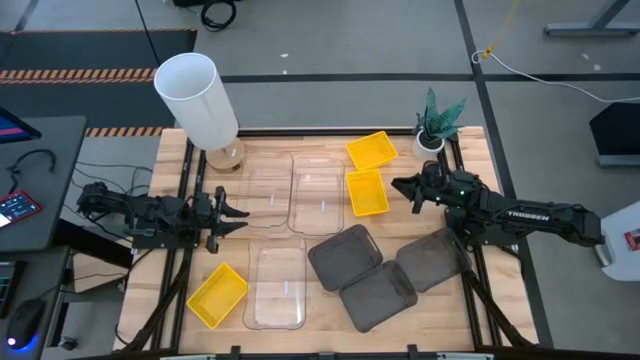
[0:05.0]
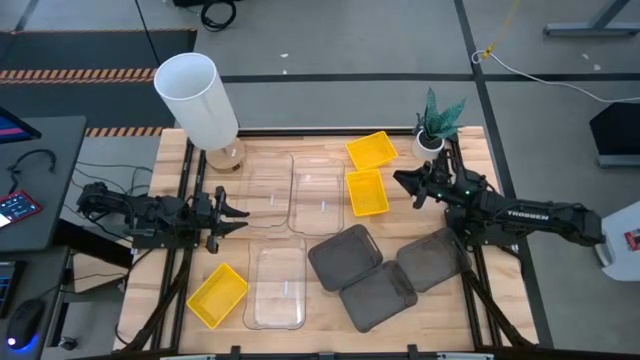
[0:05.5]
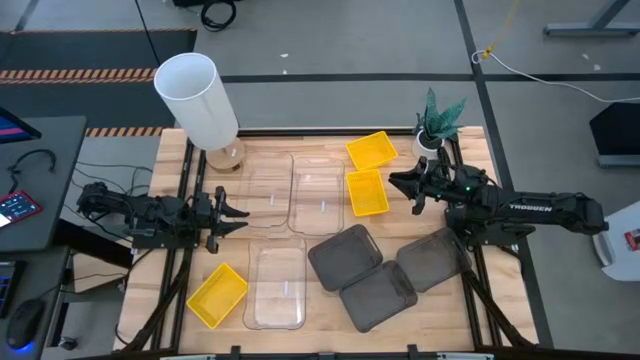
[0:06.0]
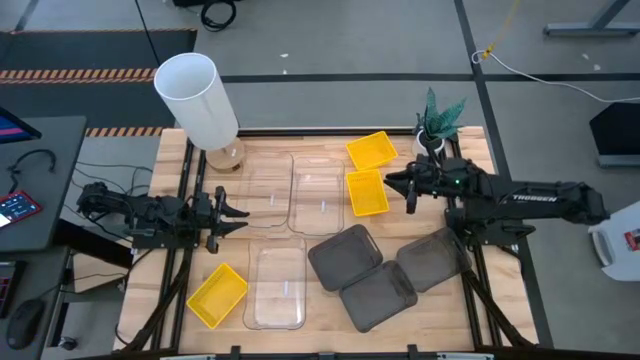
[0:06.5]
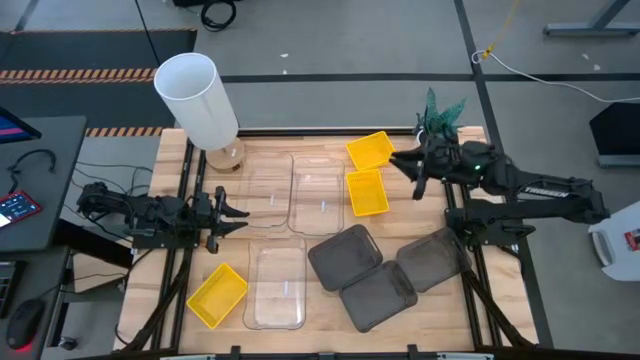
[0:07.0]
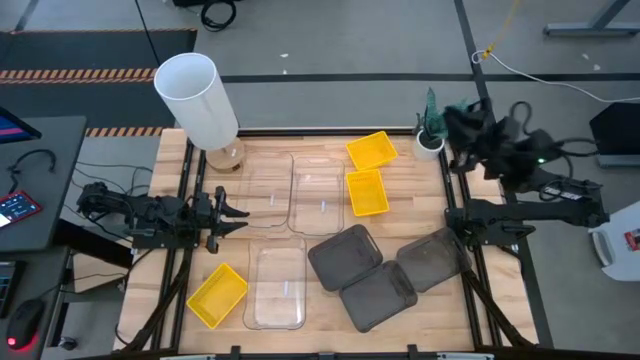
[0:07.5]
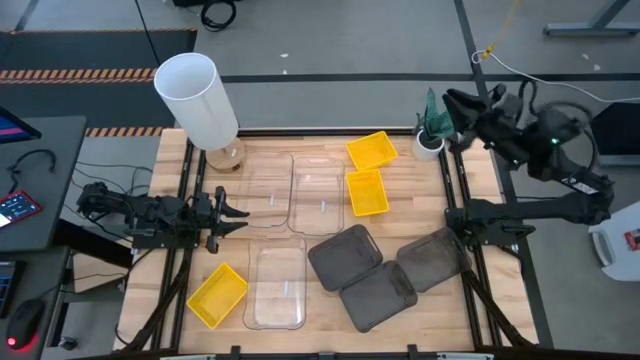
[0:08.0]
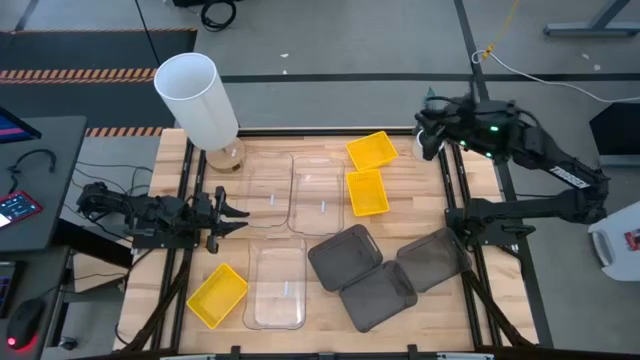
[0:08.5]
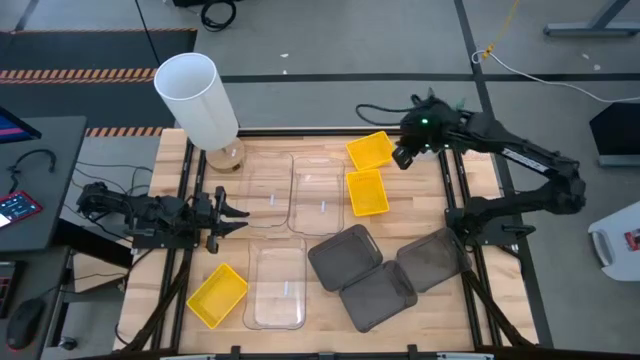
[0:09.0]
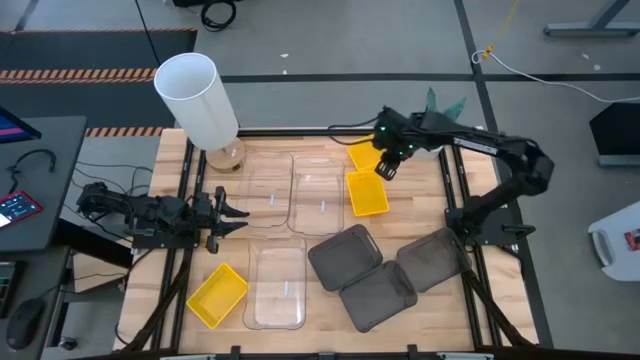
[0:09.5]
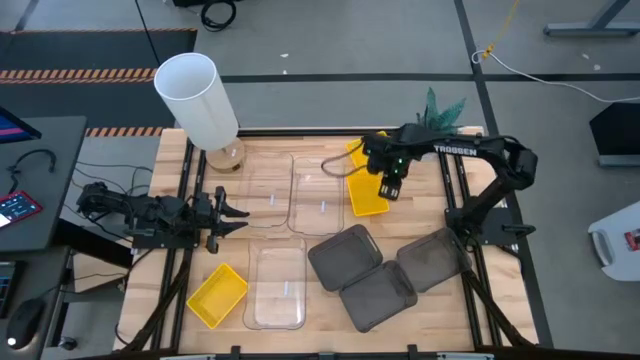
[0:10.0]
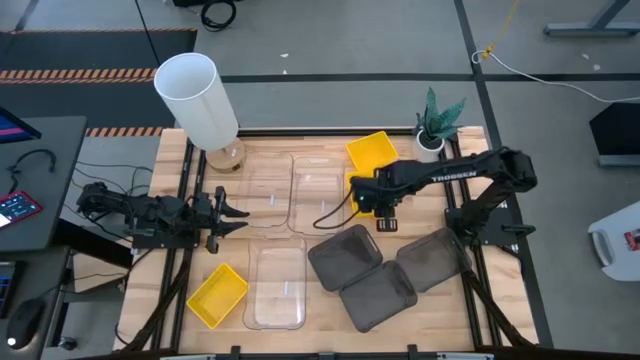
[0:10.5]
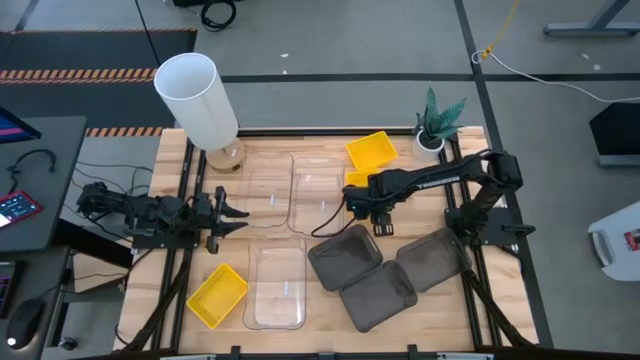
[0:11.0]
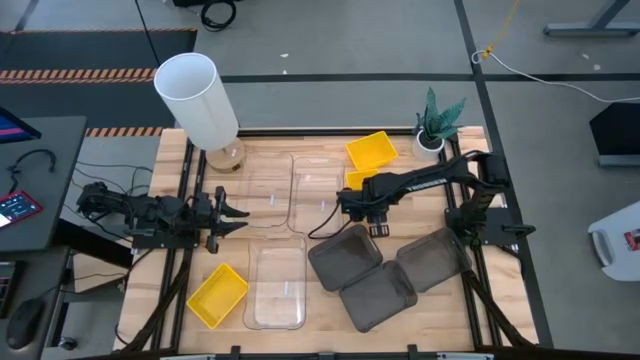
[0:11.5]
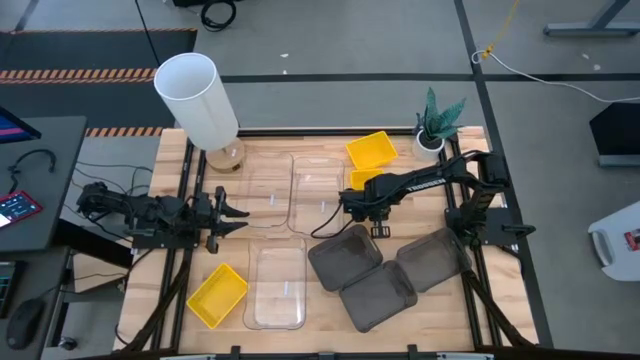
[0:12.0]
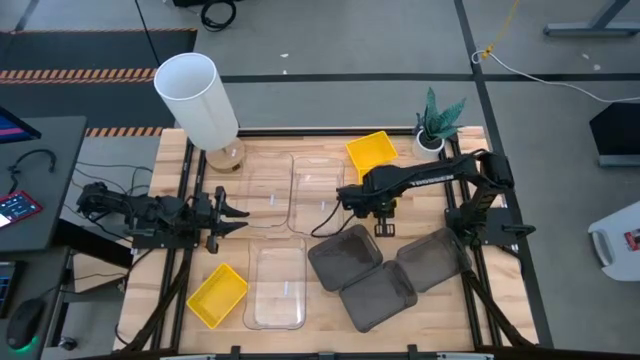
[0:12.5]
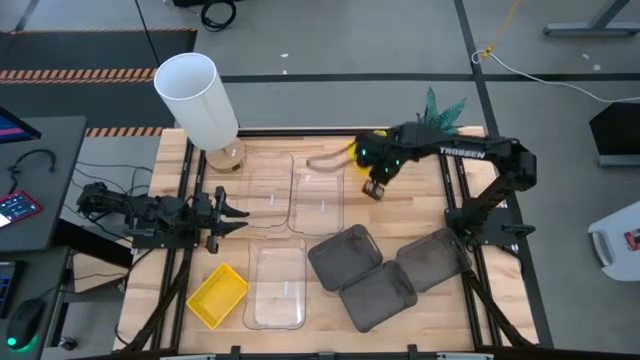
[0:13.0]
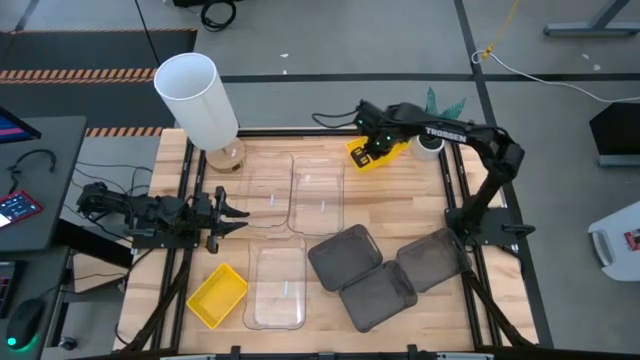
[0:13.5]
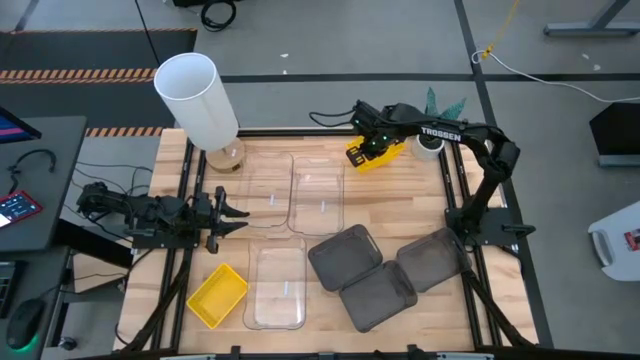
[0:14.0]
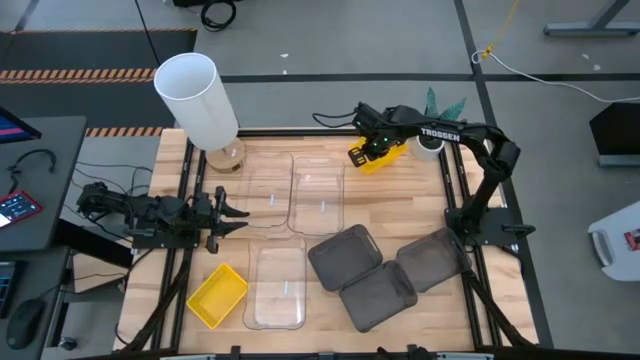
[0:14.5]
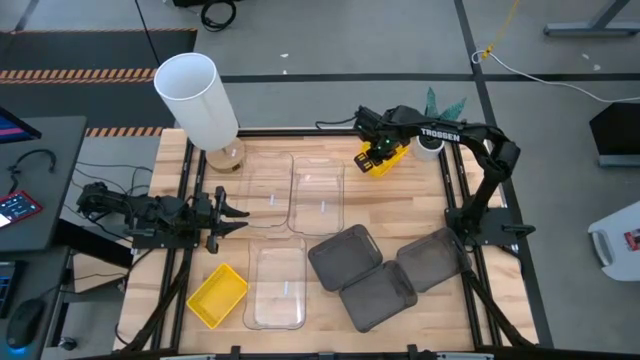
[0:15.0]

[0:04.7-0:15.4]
Stack the middle yellow bin on top of the top yellow bin
